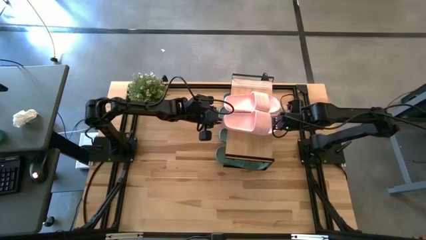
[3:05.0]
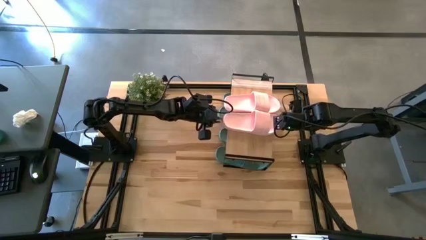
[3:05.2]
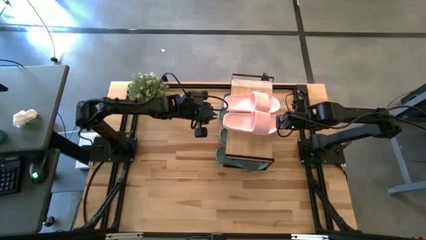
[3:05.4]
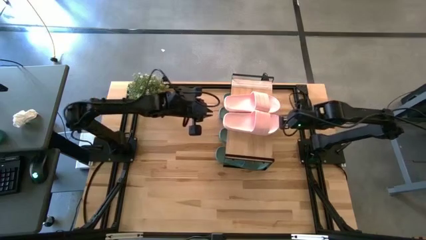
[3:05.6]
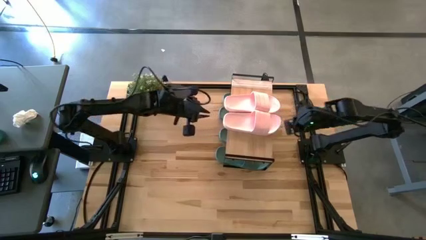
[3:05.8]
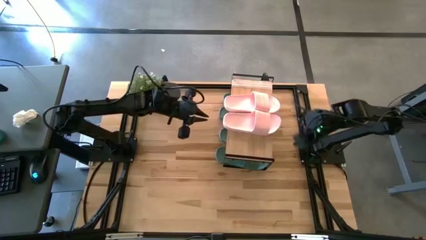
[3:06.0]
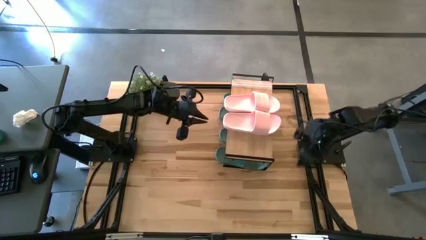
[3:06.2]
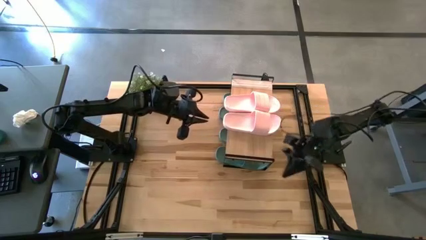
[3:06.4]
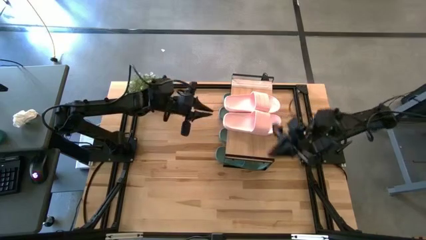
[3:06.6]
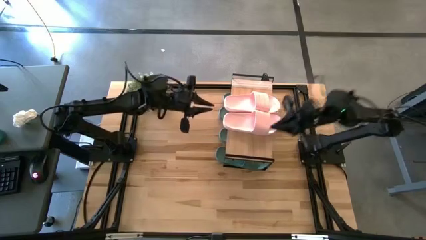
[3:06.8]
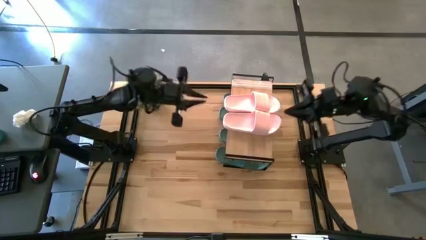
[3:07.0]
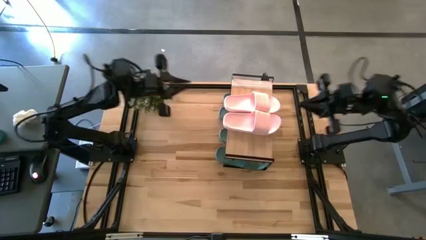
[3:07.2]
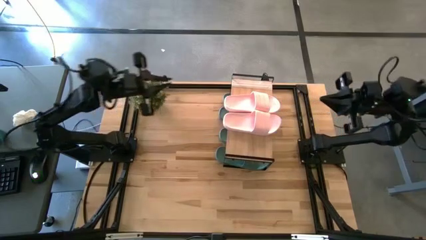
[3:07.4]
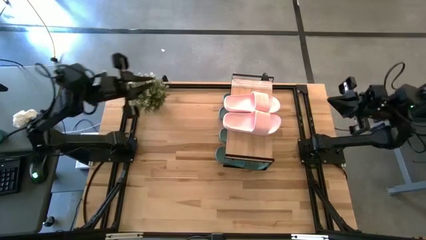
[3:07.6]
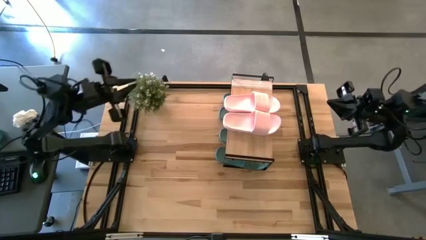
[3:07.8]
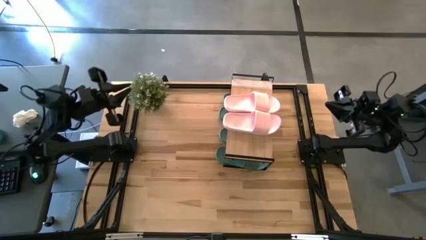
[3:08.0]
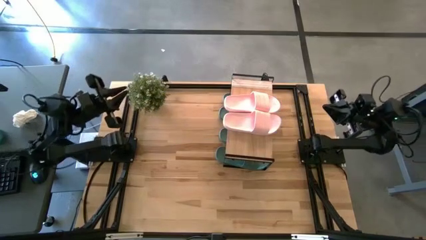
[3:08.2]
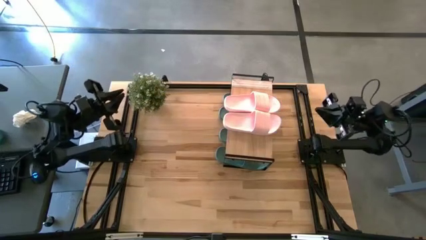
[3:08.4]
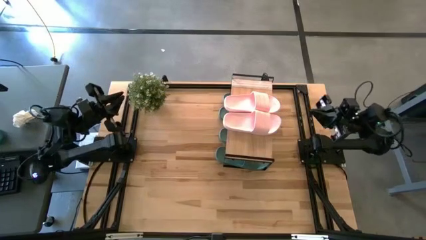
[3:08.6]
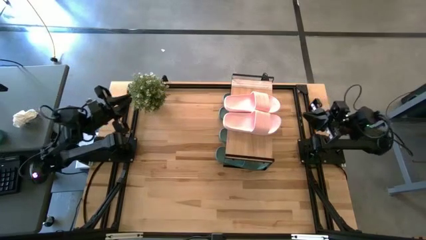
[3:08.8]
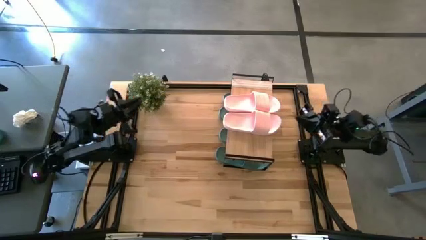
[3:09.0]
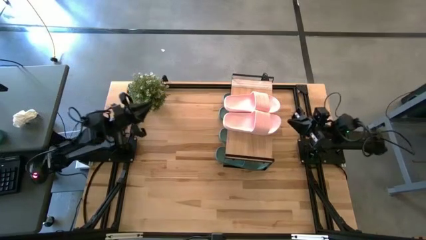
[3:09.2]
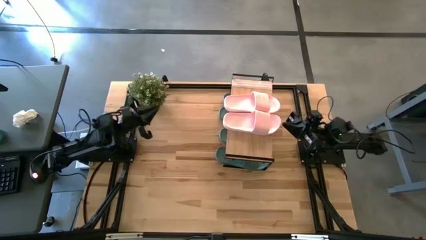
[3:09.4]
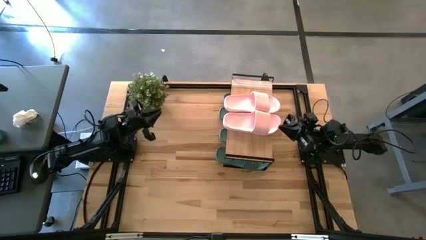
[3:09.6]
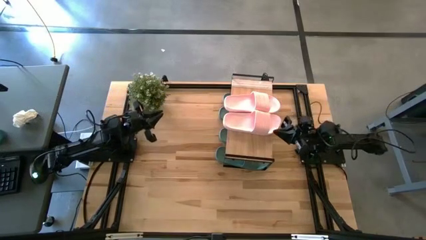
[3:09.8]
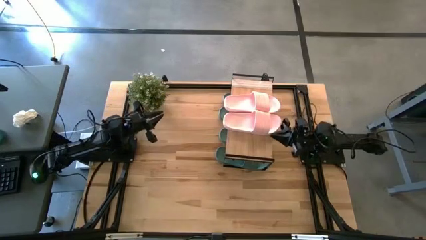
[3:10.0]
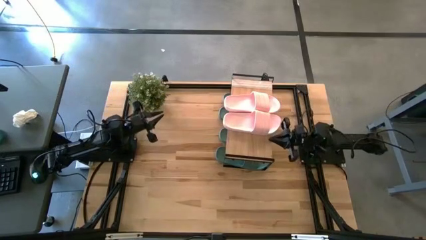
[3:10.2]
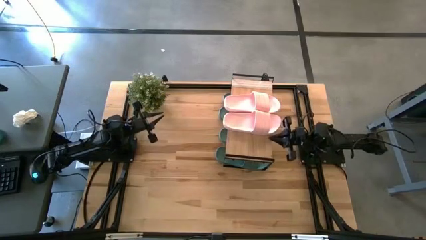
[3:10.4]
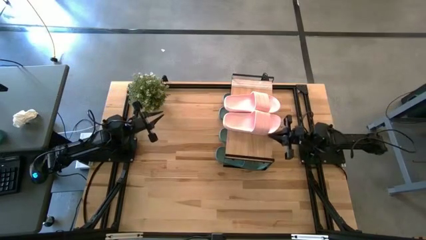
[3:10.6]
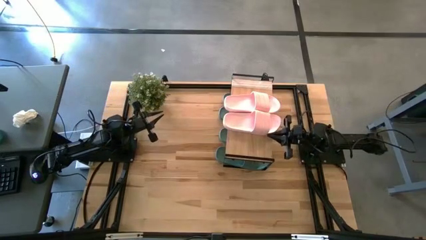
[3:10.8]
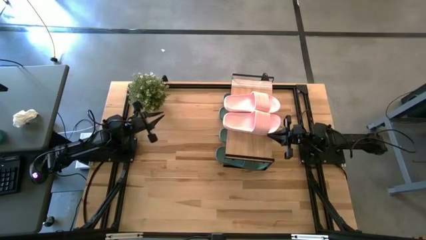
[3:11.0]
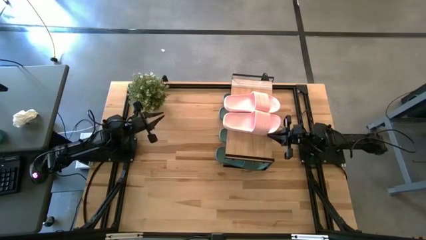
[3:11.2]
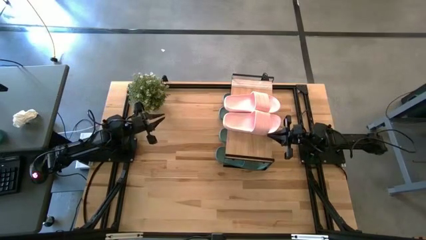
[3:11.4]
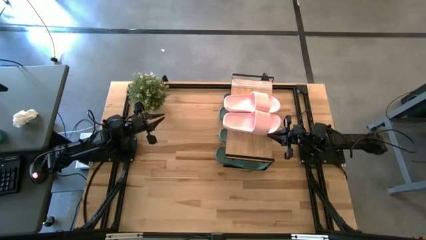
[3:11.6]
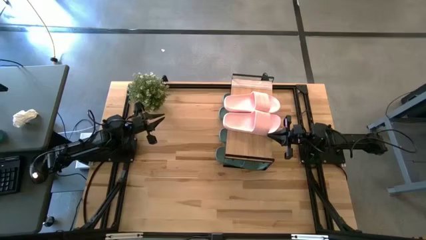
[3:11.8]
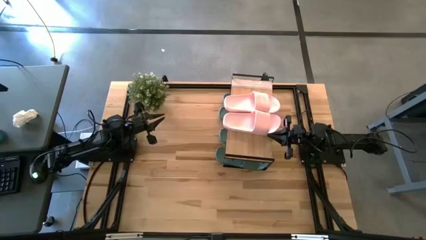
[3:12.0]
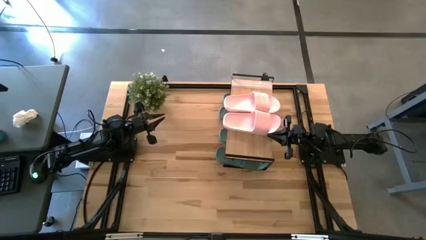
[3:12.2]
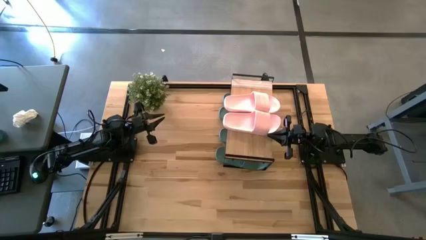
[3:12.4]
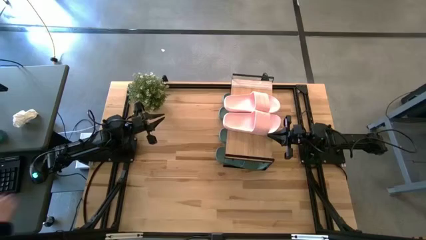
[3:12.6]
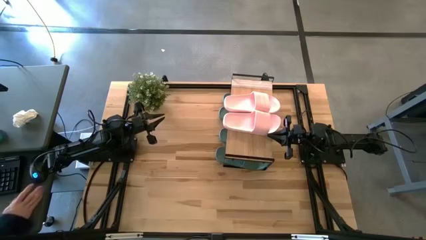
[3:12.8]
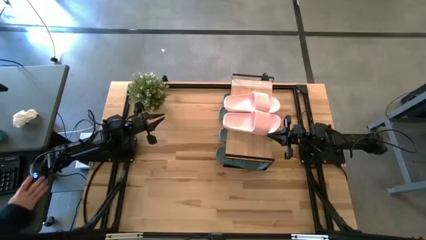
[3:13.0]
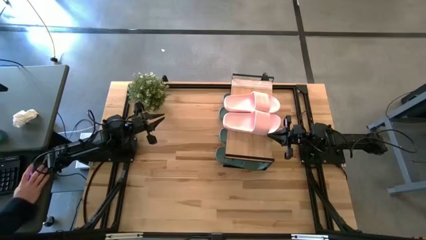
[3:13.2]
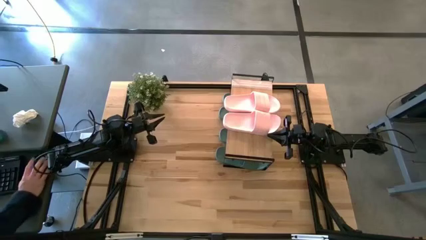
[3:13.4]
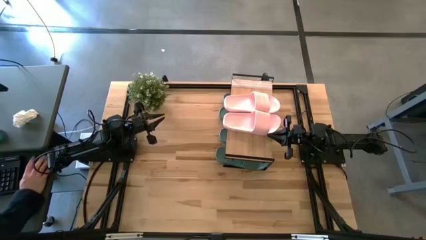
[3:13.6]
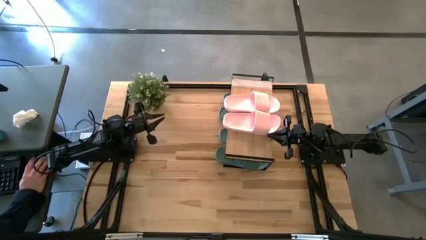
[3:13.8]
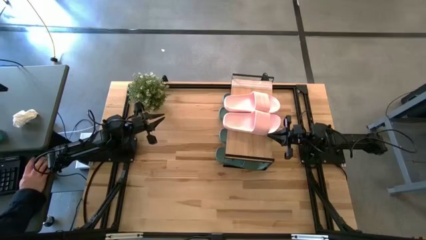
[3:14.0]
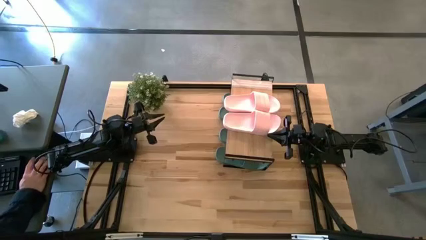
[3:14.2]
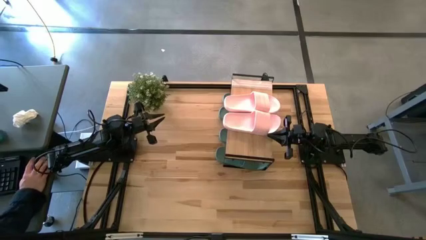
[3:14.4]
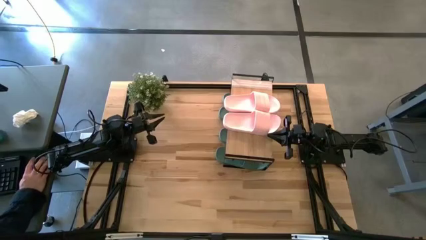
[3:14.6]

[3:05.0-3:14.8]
Task: Pick and place slides into the shelf
Return to Home Position

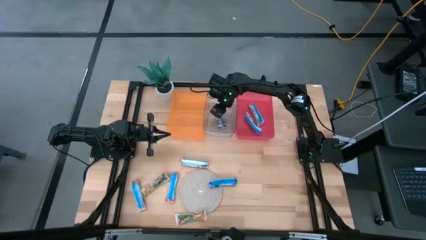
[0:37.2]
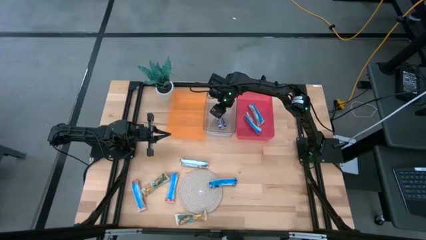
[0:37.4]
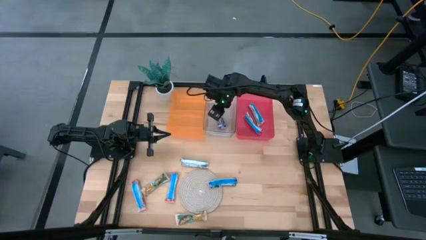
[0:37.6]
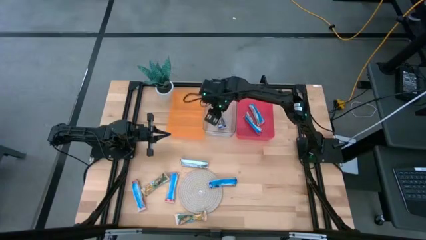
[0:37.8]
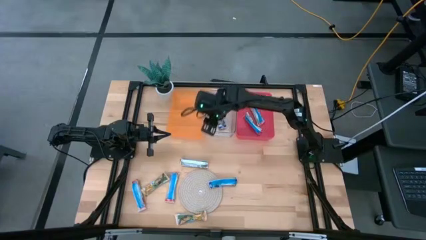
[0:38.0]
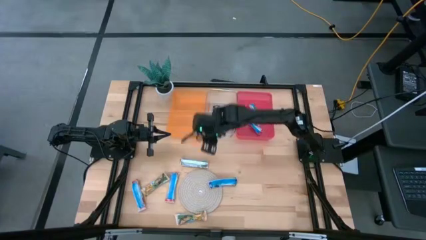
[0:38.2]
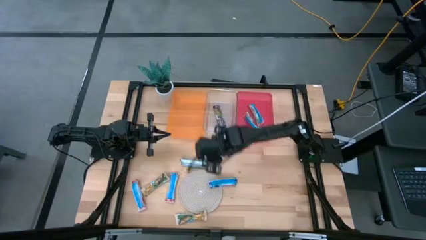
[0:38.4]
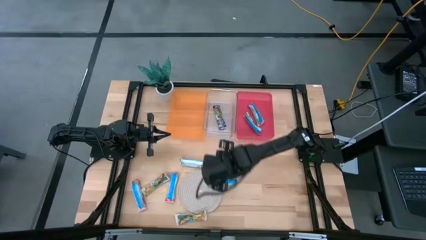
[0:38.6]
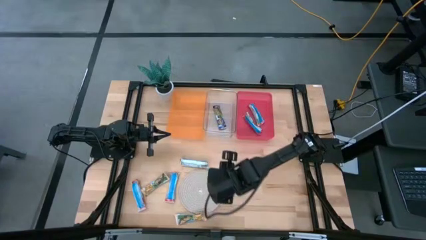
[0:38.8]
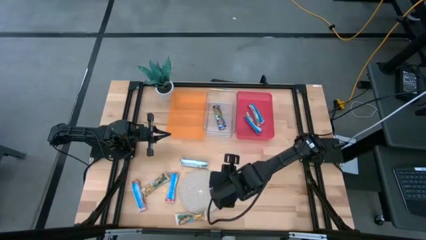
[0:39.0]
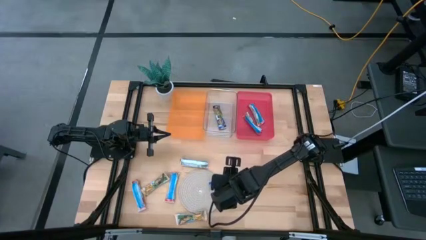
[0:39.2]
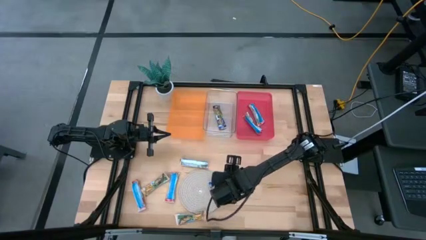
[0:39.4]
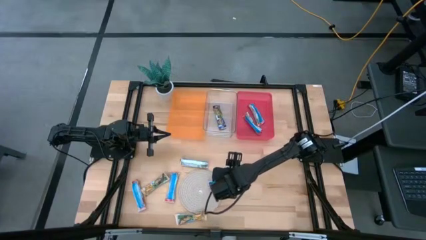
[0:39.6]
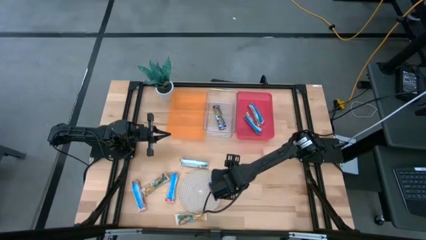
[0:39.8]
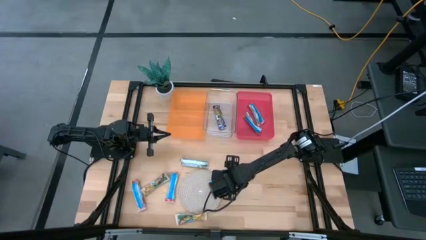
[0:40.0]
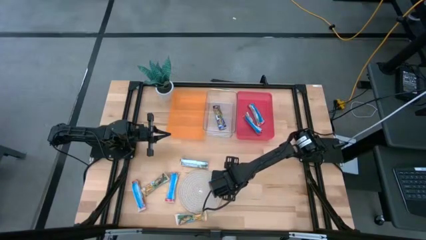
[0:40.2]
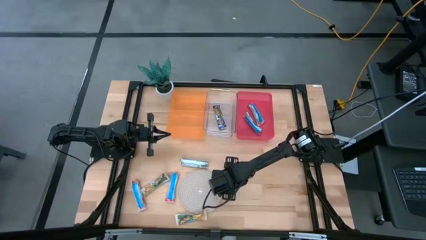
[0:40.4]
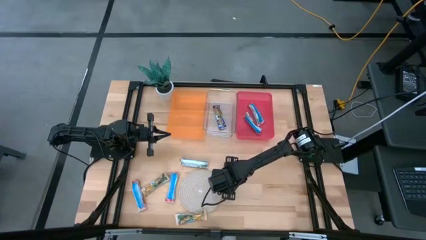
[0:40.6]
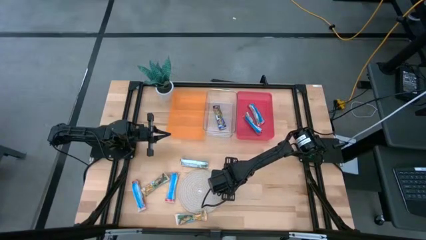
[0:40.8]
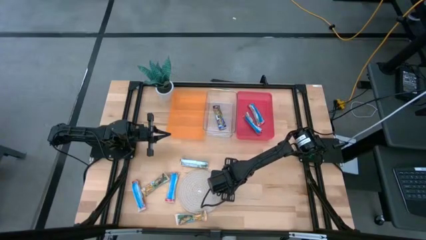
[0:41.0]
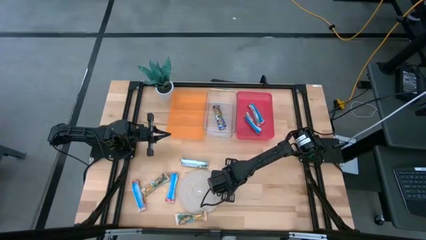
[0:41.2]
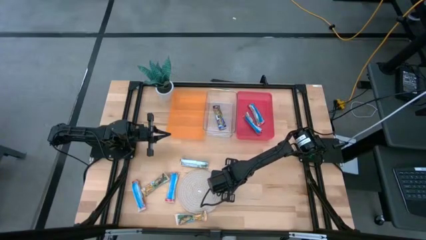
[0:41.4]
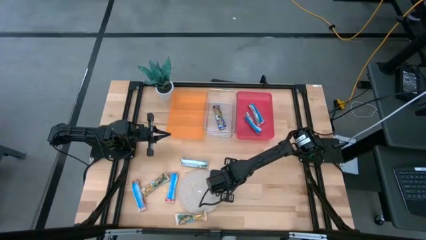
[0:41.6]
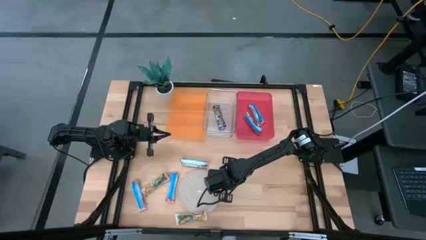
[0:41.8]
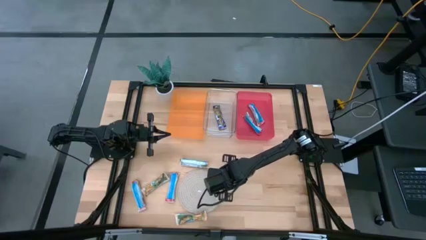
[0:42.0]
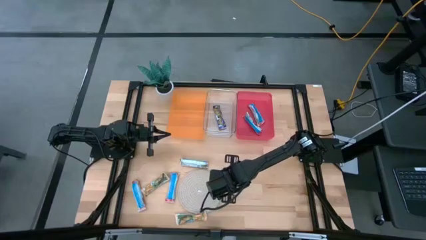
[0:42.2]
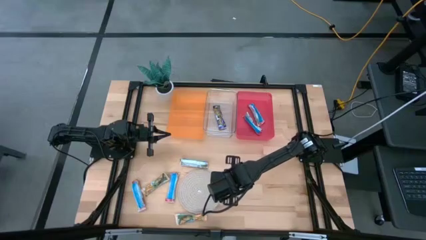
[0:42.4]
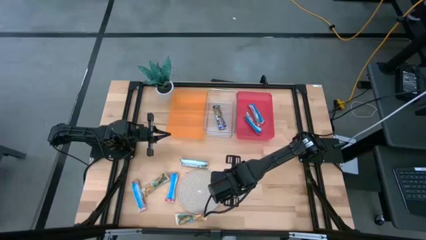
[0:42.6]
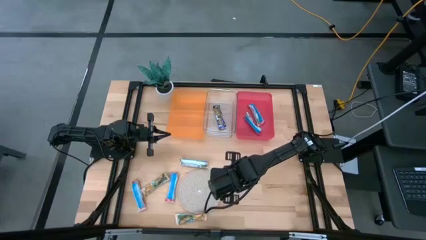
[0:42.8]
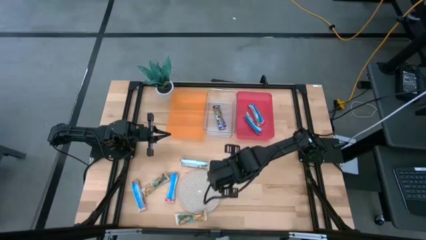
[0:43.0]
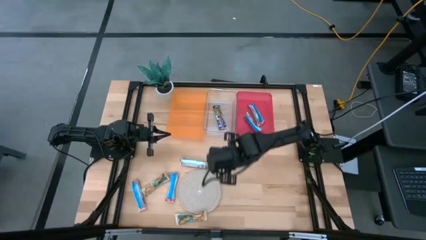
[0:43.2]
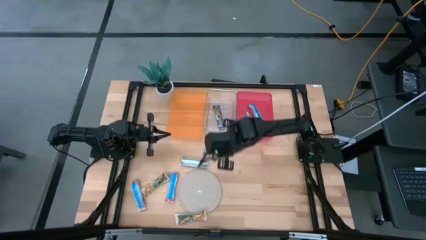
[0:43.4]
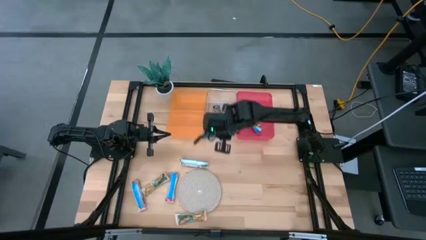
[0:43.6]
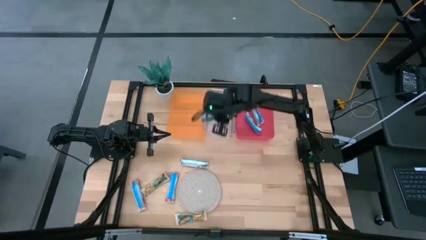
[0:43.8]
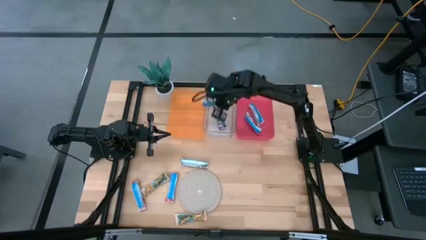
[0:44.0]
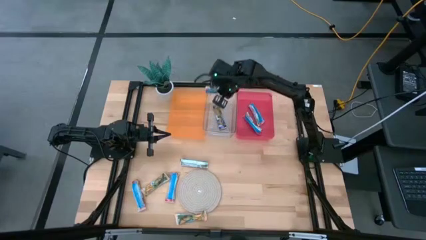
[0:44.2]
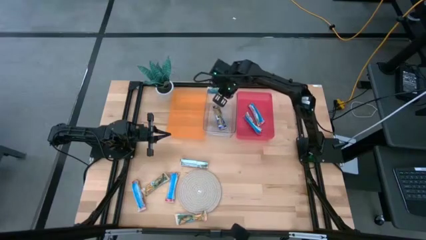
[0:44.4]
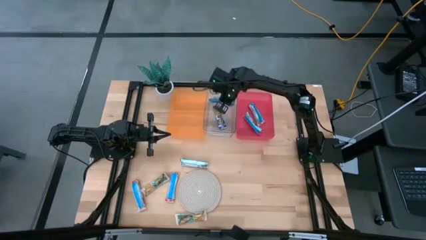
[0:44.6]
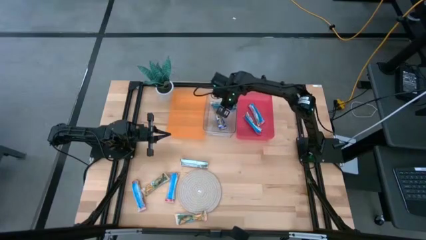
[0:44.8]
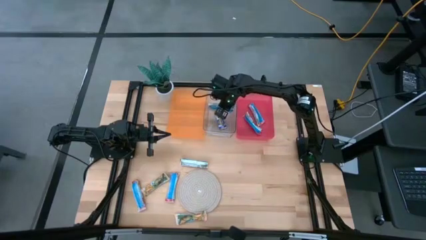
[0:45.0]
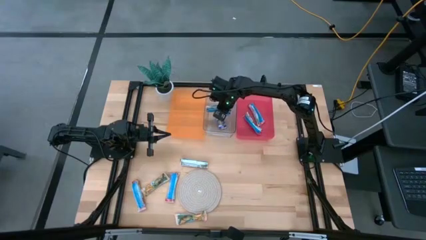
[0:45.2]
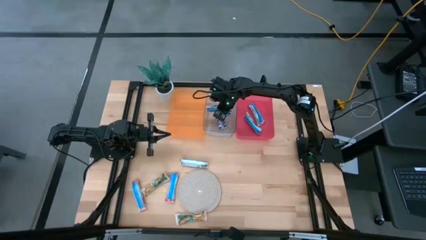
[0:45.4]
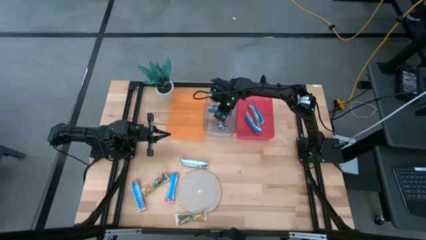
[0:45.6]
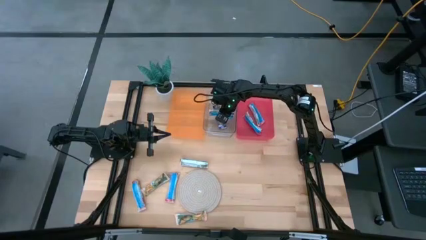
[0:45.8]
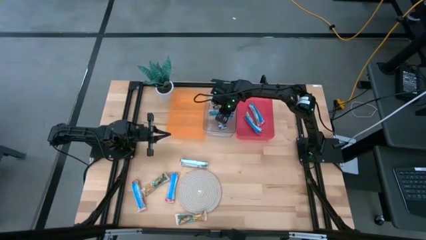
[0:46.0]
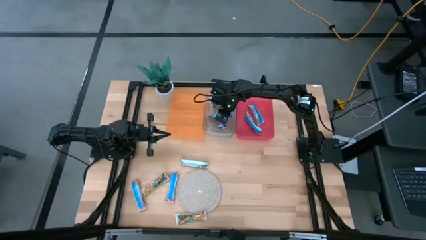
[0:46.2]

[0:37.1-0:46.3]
Task: Pick and place Granola Bars by type
Put the blue granola bar into the transparent bin
